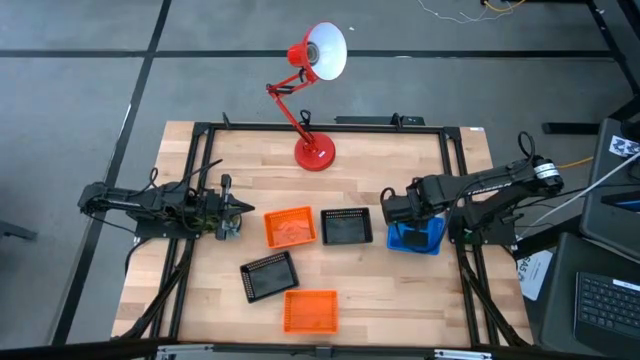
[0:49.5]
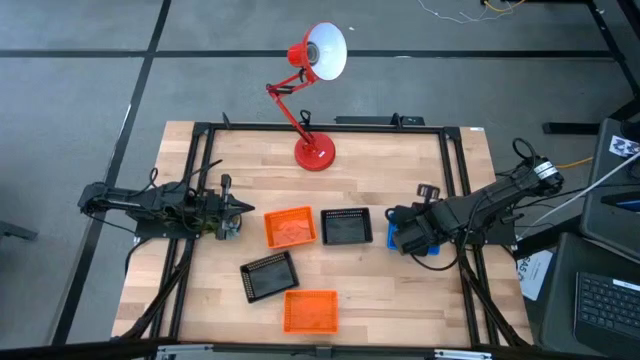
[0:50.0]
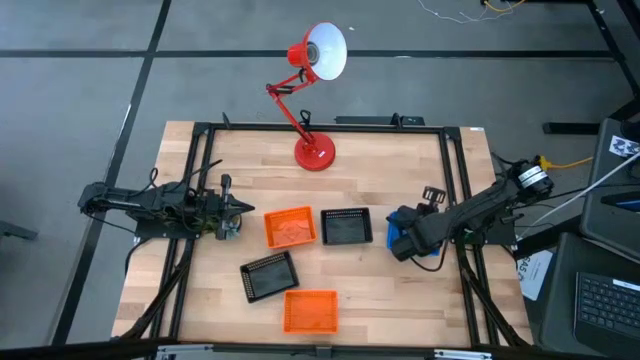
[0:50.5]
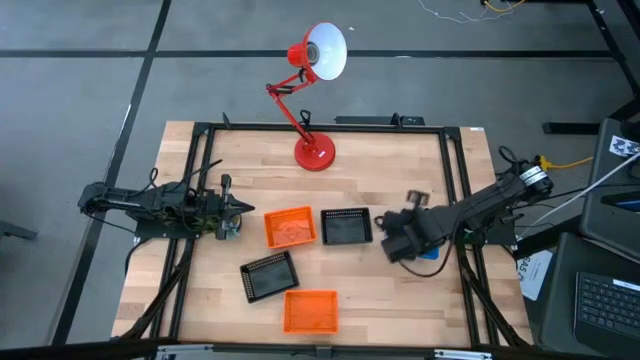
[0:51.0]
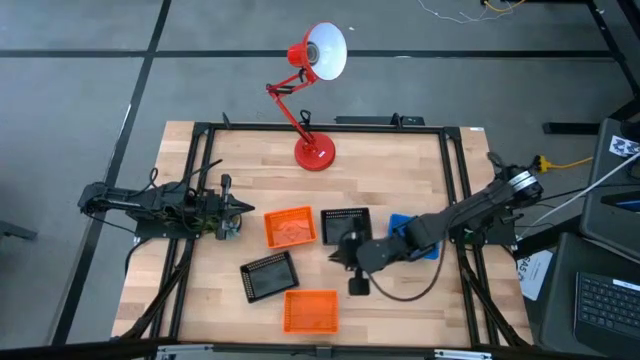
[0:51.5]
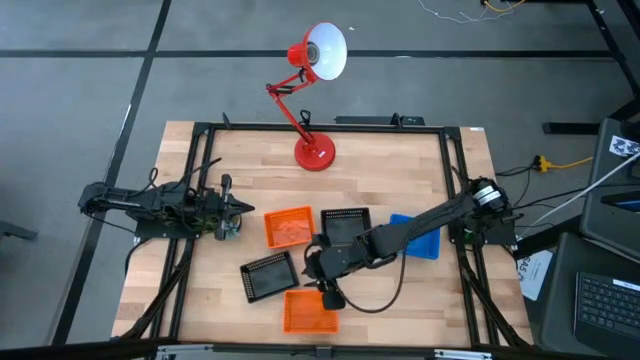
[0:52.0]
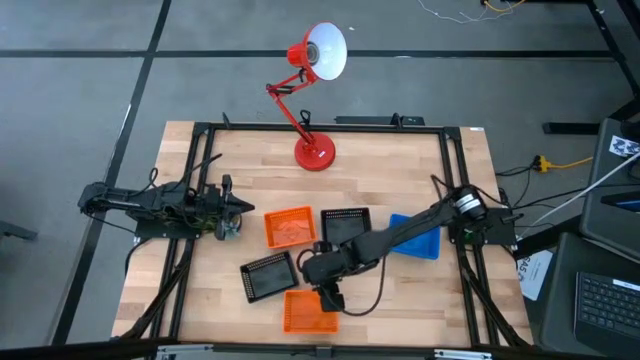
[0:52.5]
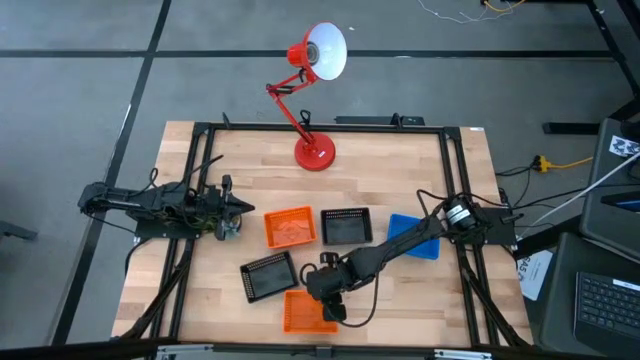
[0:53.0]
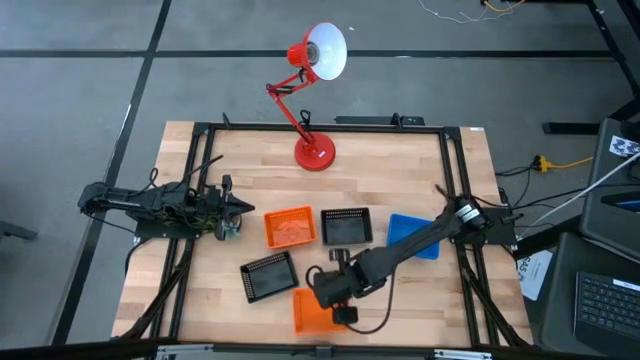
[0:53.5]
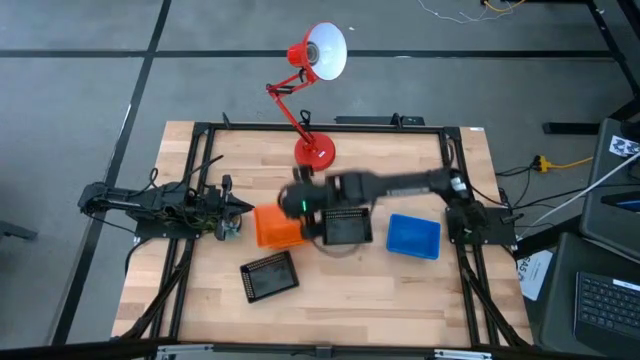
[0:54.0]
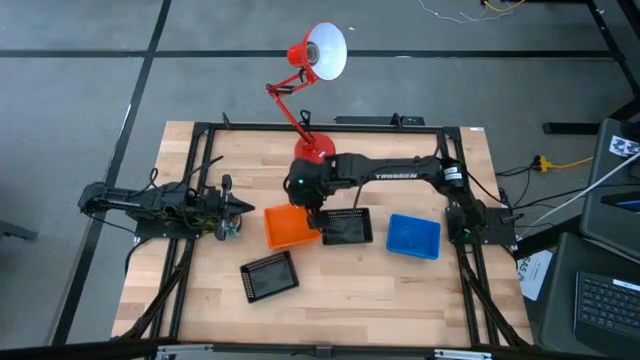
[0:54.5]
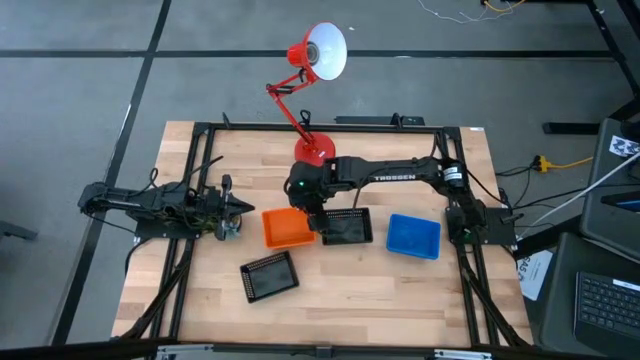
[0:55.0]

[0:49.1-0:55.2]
Stack the bottom orange bin on the top orange bins

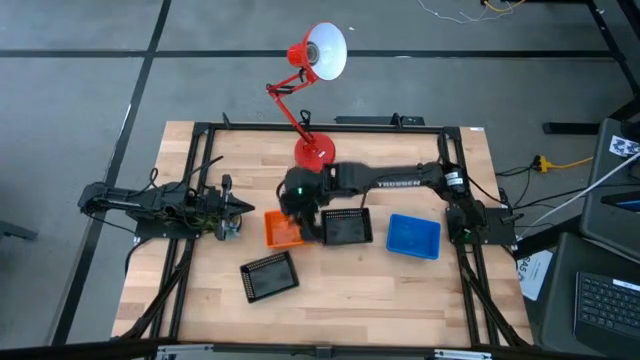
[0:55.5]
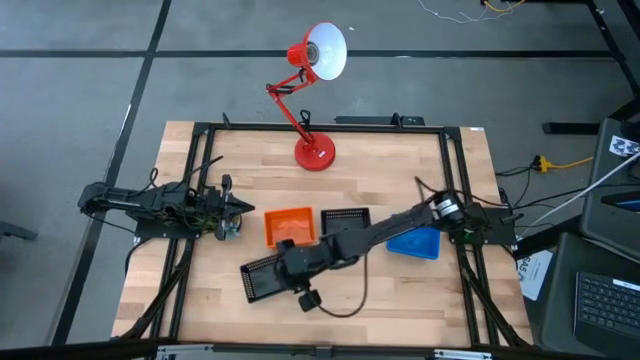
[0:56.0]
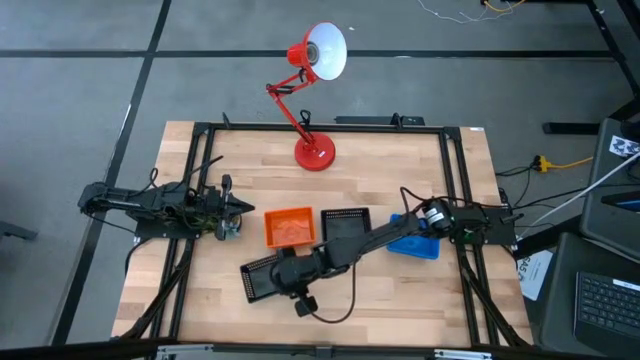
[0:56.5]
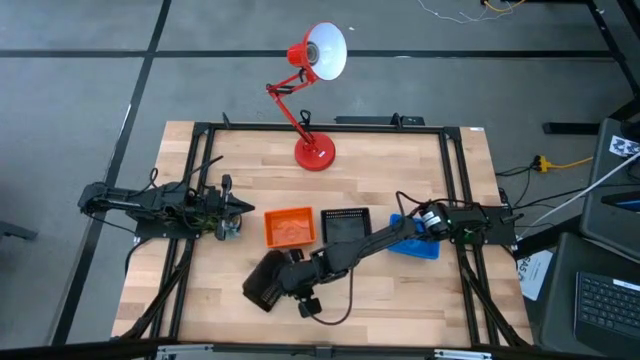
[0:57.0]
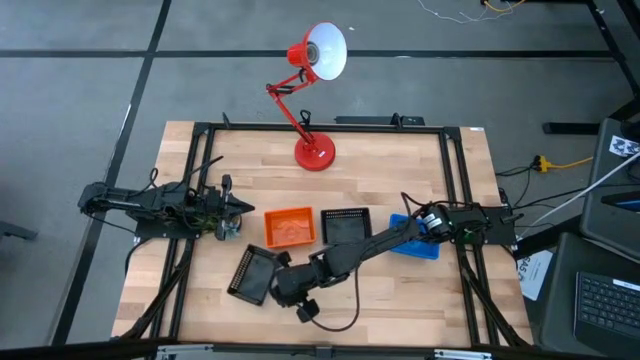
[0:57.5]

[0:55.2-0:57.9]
Stack the left black bin on the right black bins

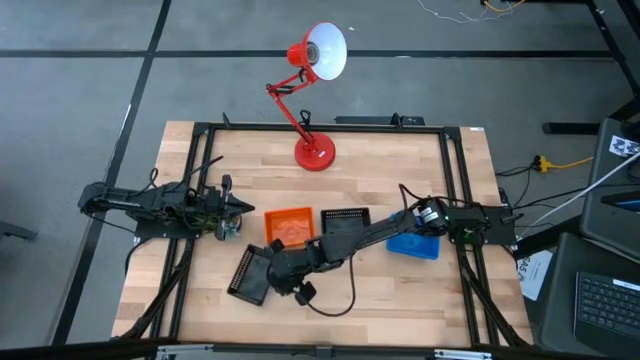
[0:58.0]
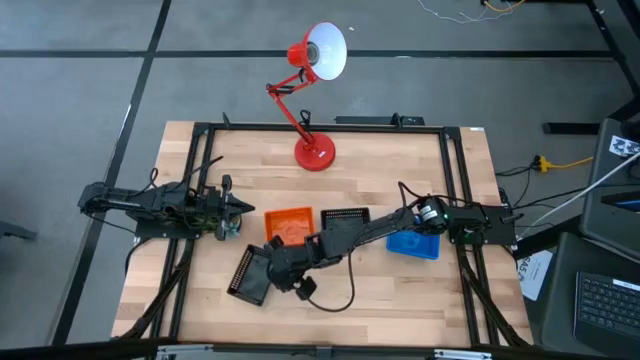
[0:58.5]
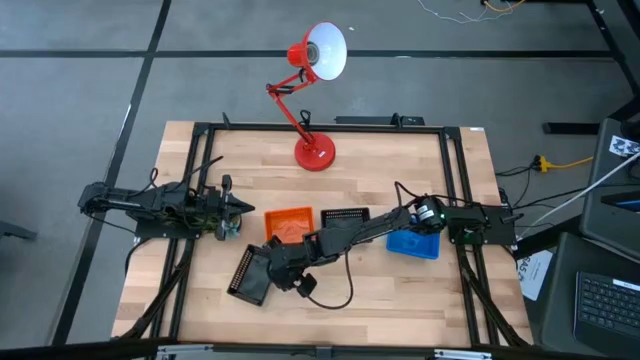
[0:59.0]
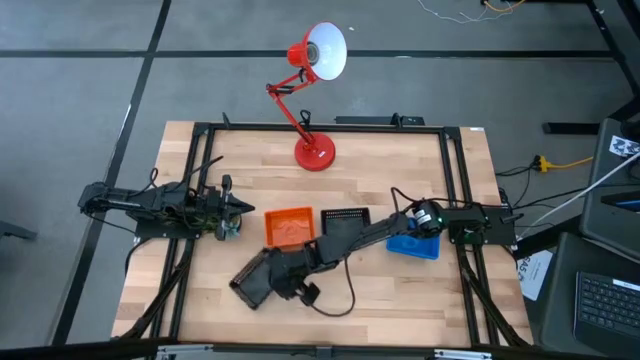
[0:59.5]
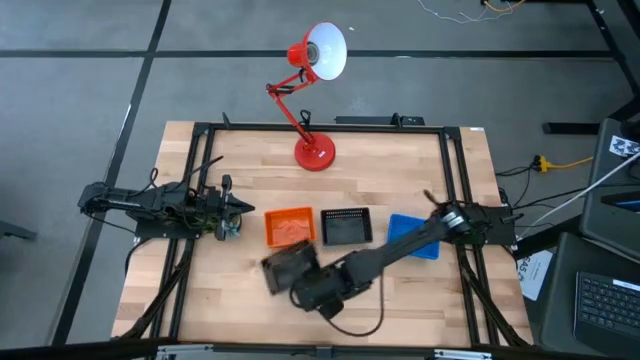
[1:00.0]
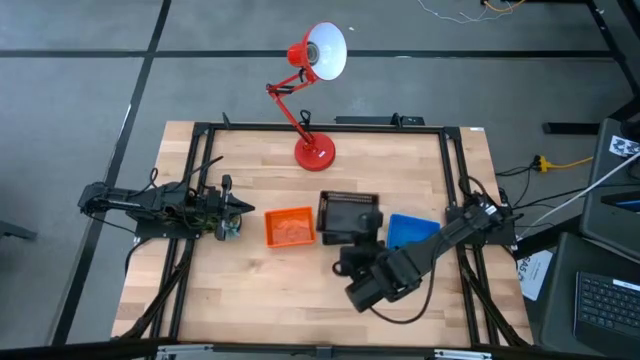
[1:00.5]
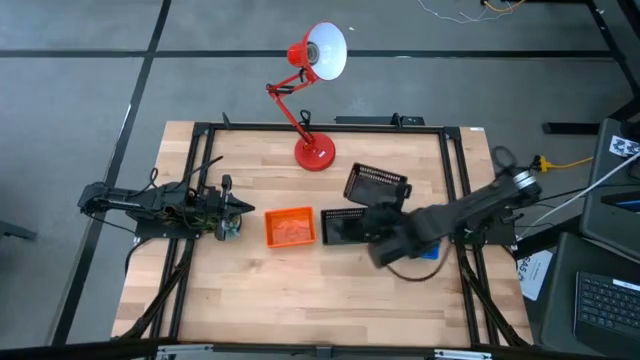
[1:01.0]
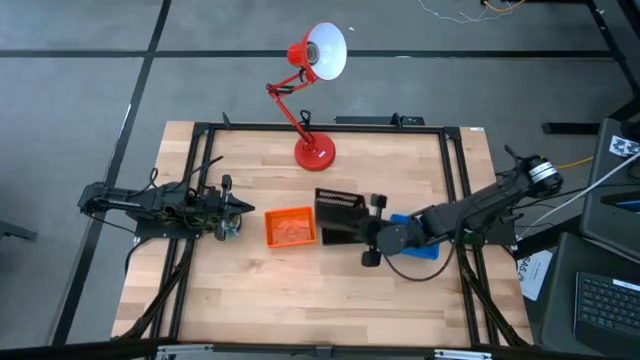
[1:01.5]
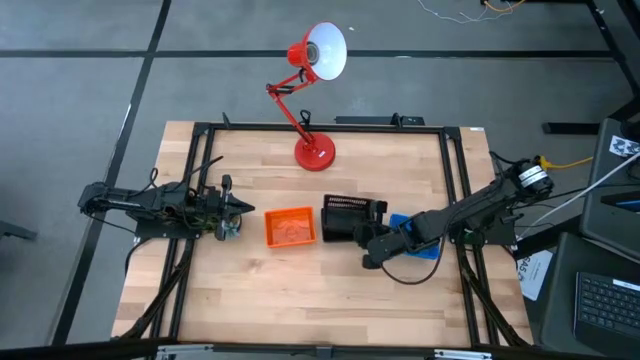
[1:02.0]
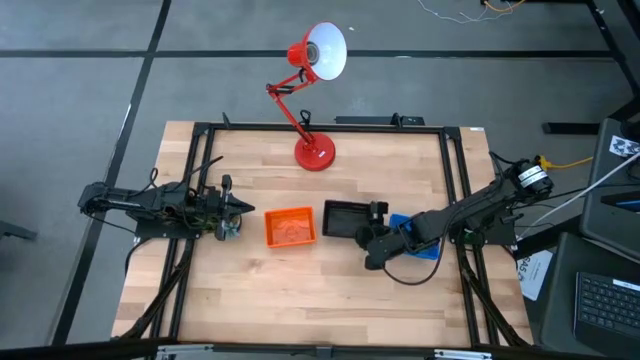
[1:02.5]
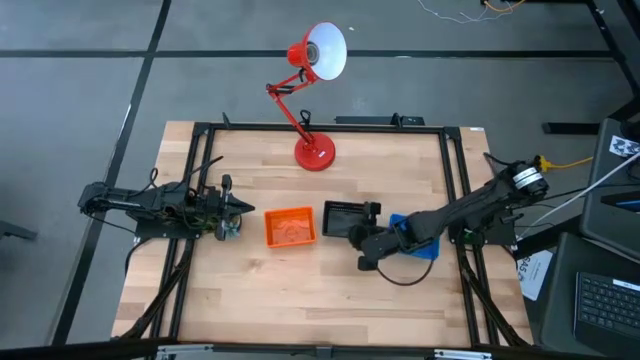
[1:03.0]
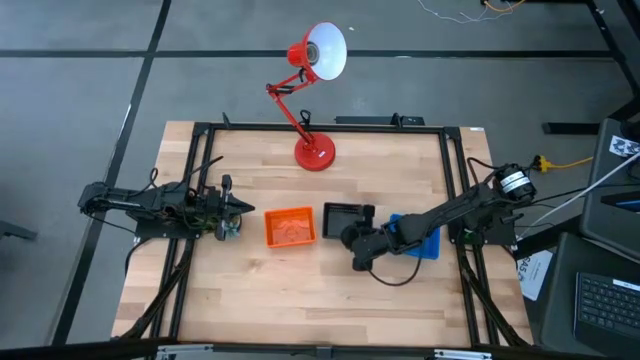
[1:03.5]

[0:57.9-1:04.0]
Stack the left black bin on the right black bins

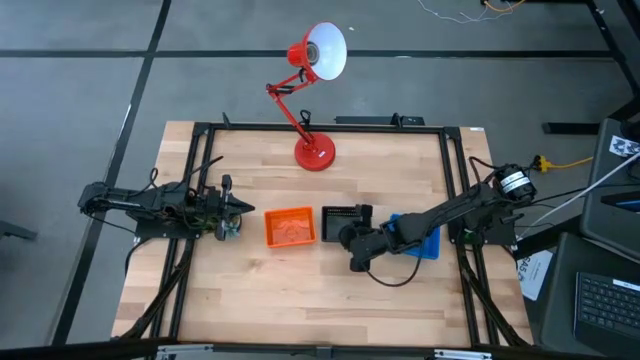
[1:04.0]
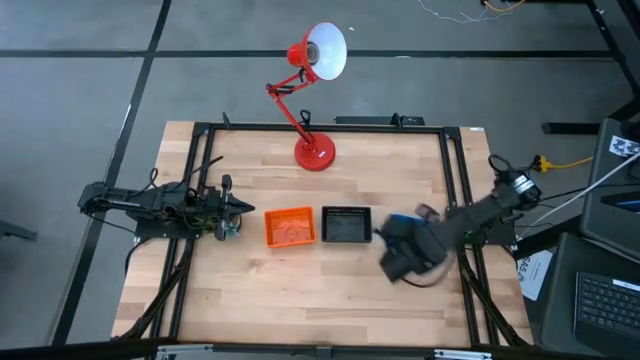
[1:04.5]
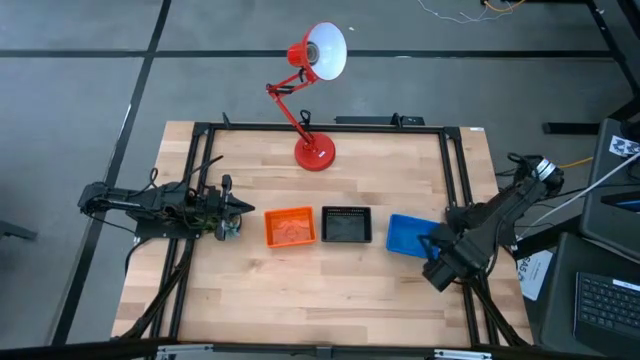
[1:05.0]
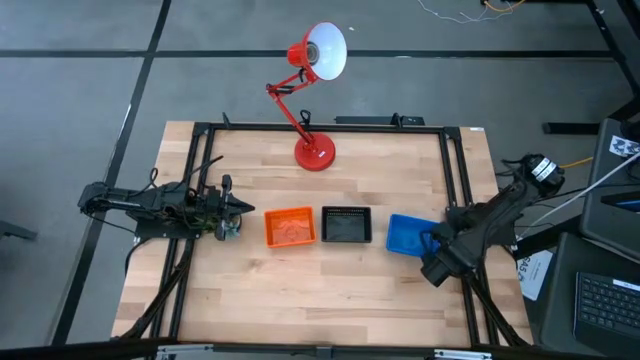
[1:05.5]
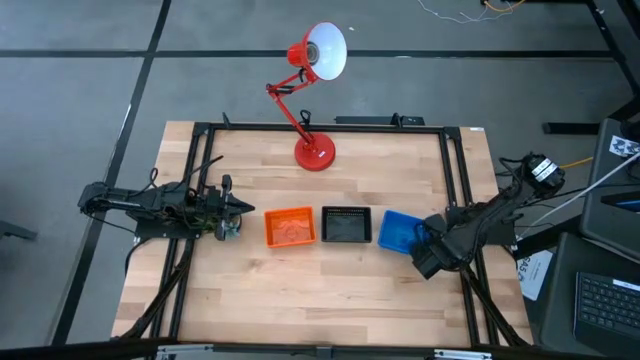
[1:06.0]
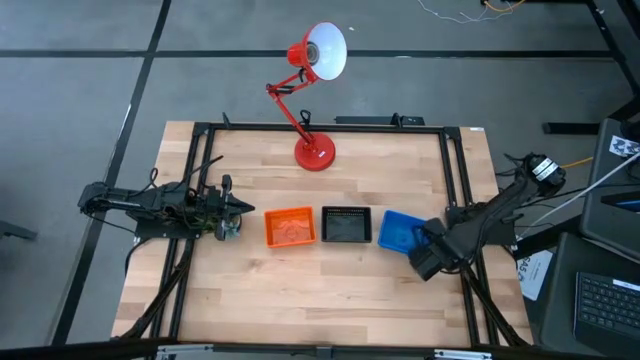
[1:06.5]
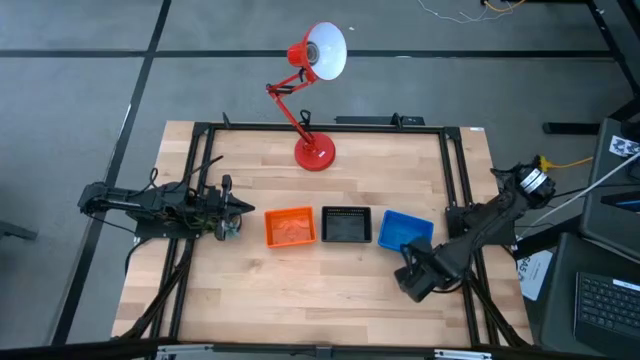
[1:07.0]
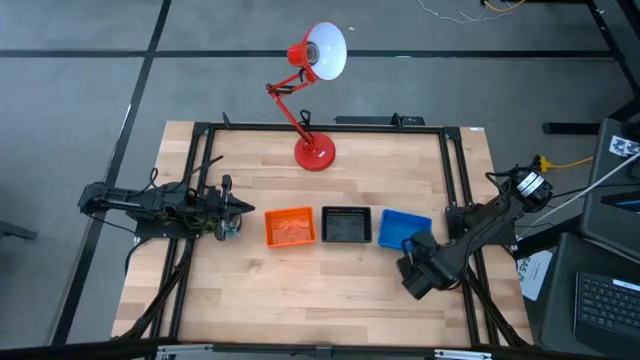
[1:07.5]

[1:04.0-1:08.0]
Adjust the stacked blue bins

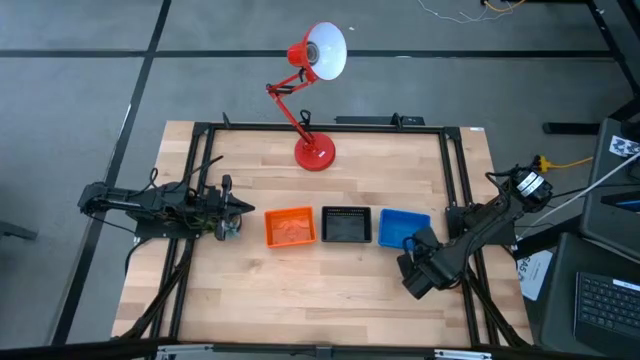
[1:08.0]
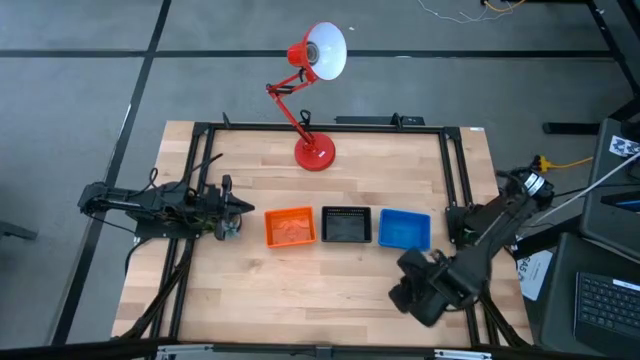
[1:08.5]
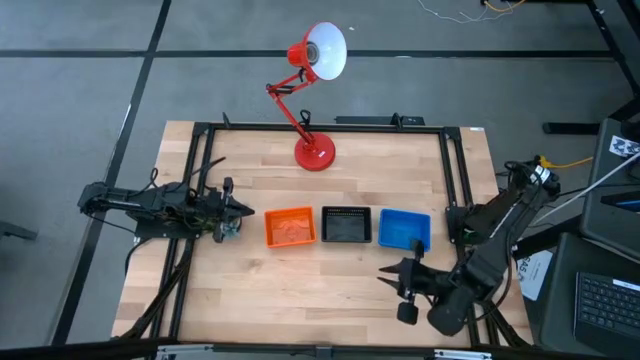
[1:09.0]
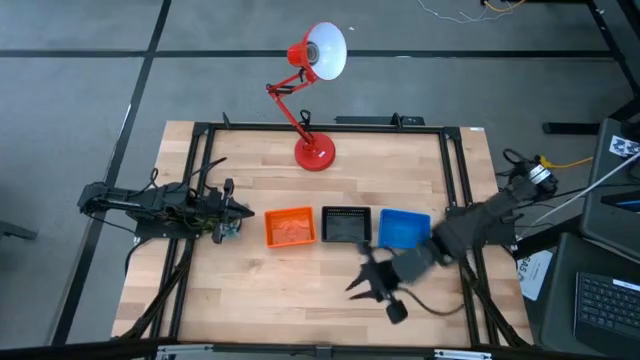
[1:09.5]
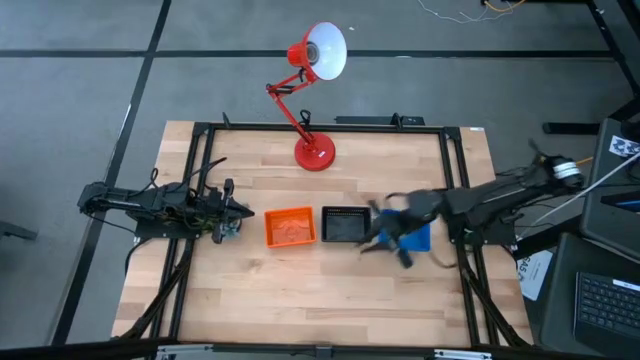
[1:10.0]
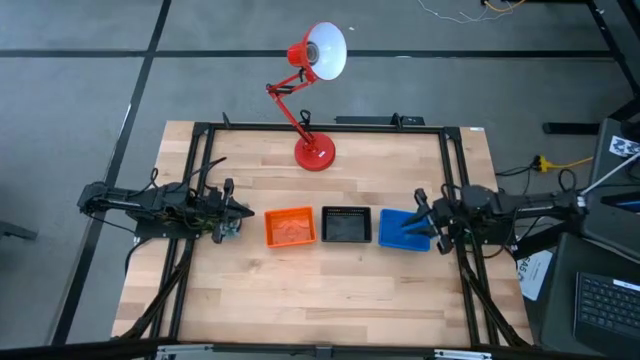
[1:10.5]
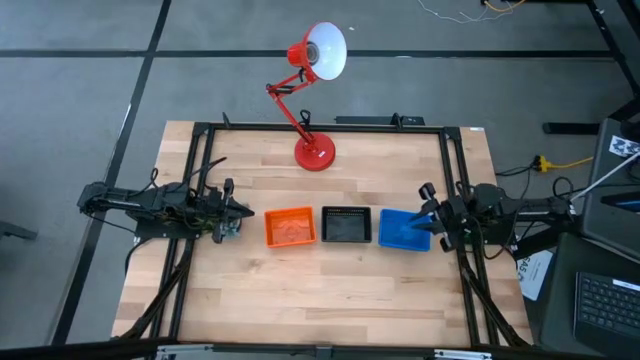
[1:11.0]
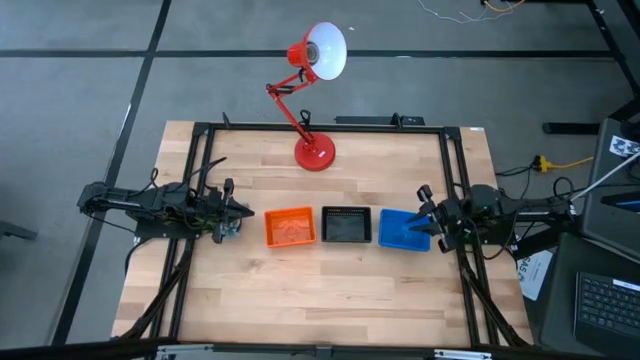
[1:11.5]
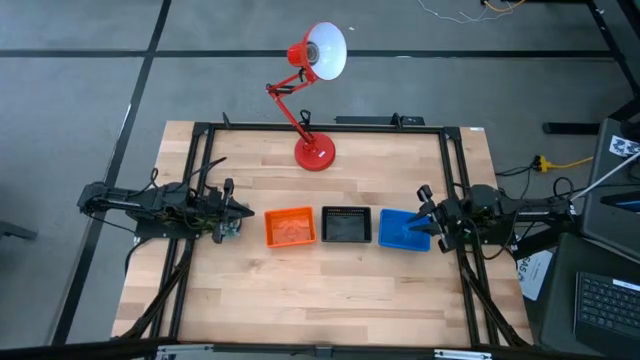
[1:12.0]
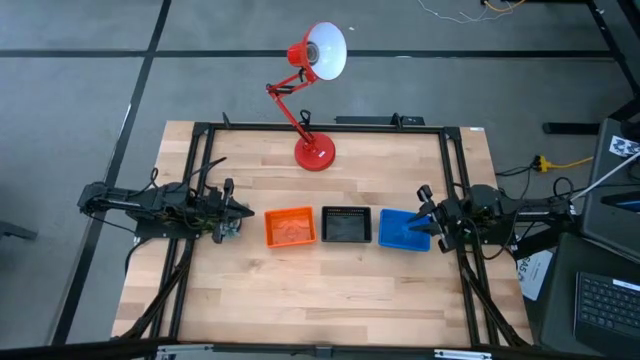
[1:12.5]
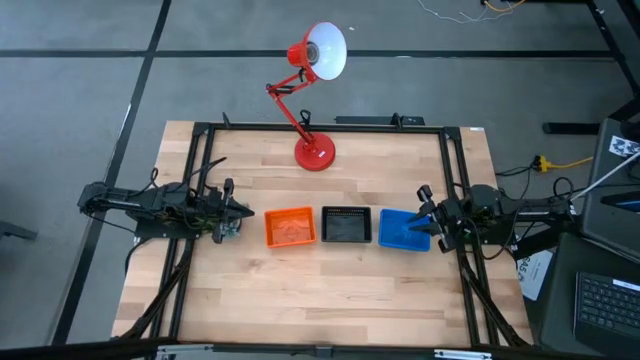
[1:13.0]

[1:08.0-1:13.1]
Return to Home Position
